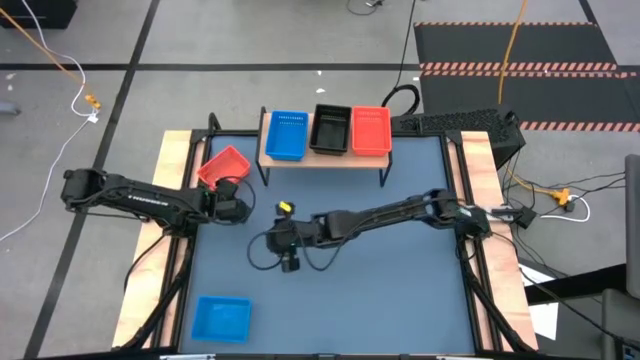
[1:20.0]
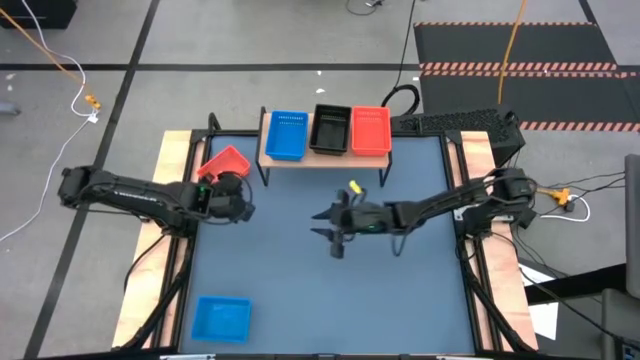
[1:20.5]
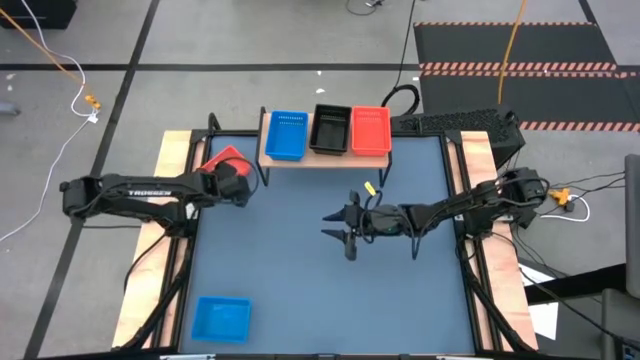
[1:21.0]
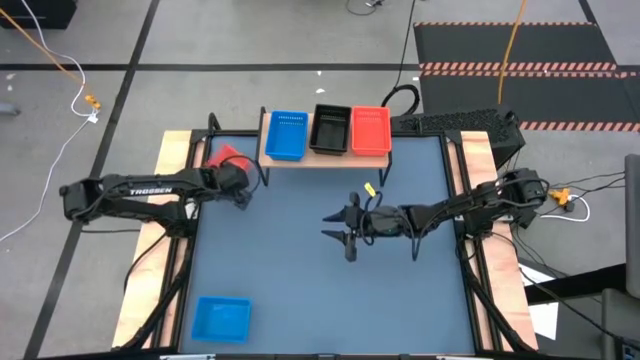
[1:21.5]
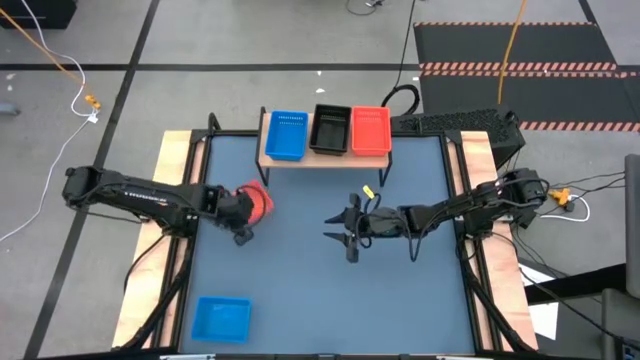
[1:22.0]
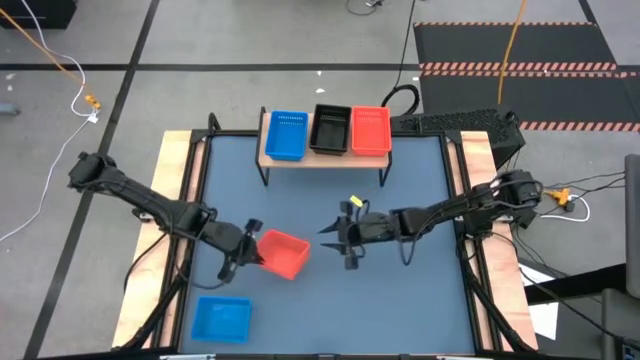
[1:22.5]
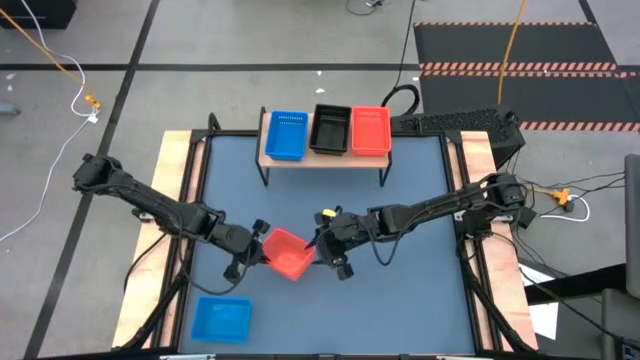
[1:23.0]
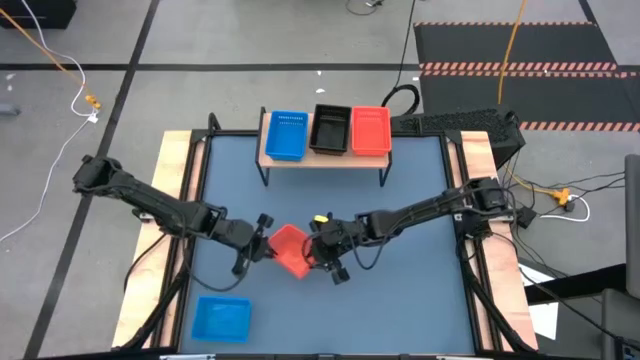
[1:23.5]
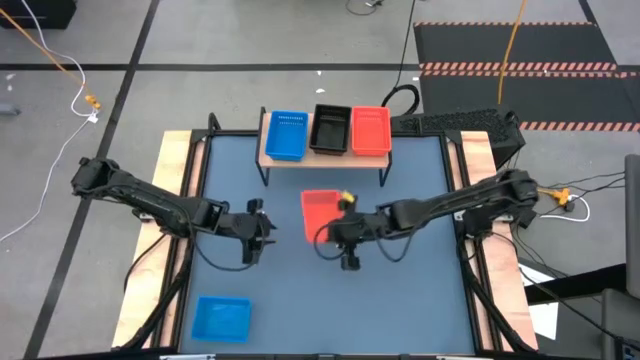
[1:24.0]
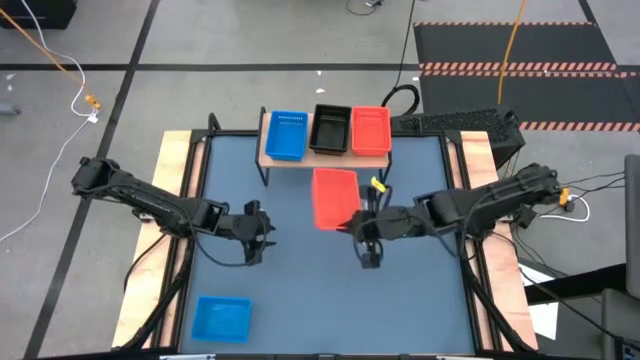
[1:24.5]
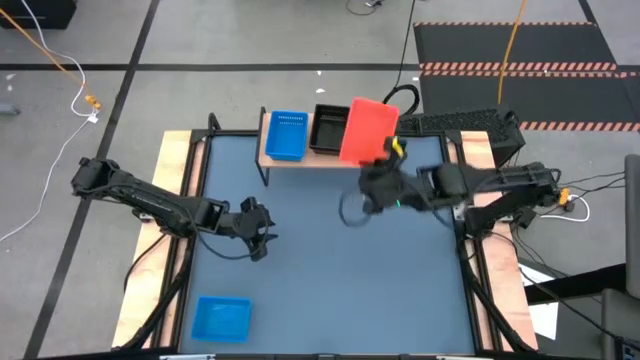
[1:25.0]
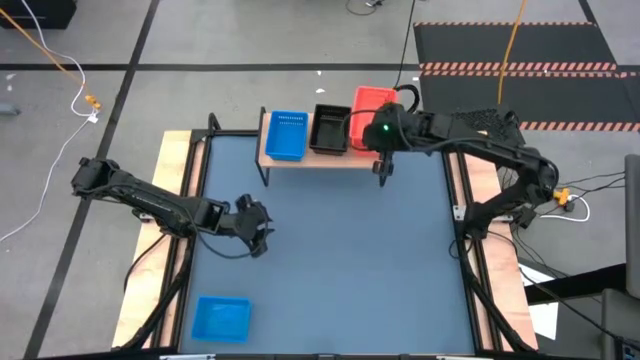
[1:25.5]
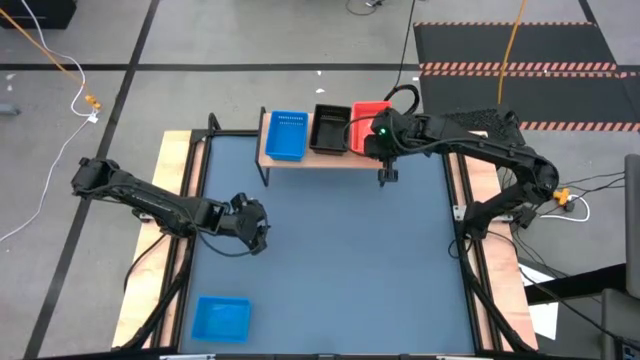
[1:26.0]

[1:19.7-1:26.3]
Task: Stack baskets on shelf by color
Stack the orange bin on the stacked orange bins on the shelf

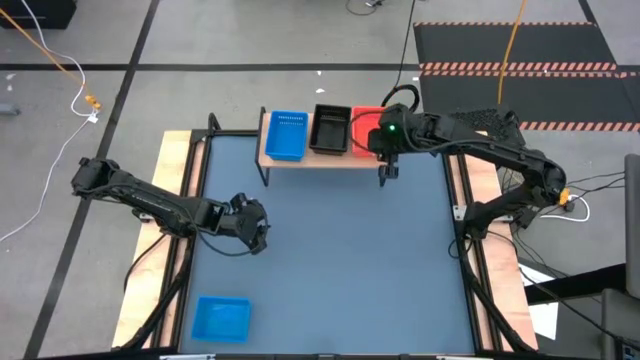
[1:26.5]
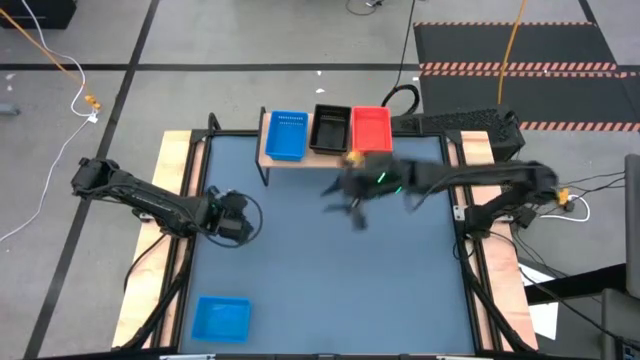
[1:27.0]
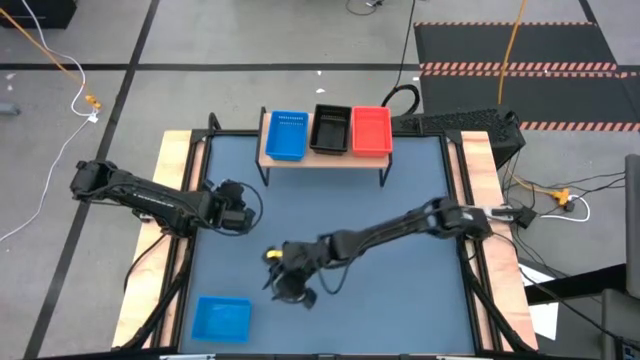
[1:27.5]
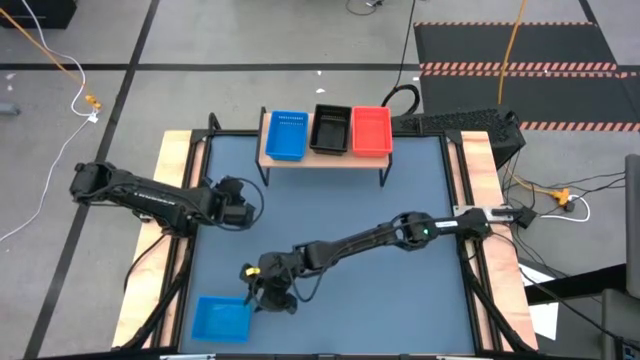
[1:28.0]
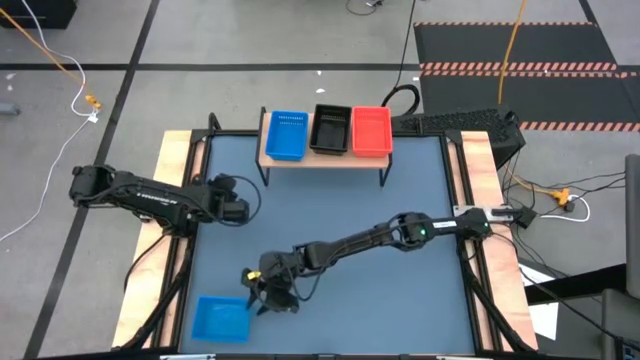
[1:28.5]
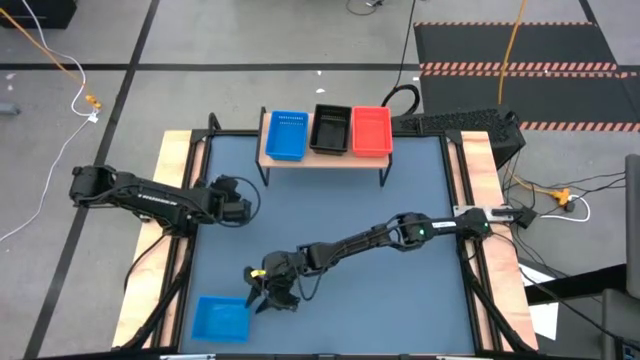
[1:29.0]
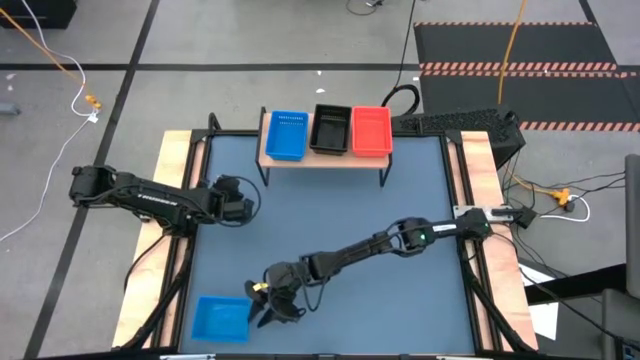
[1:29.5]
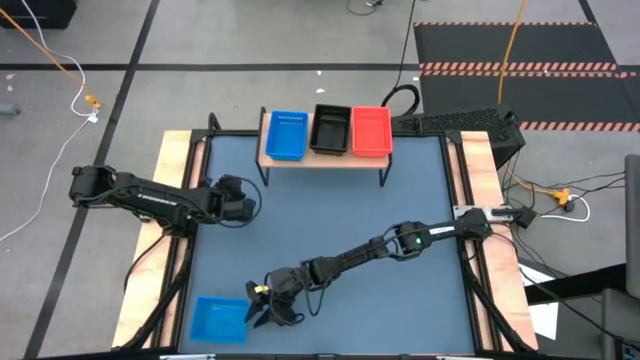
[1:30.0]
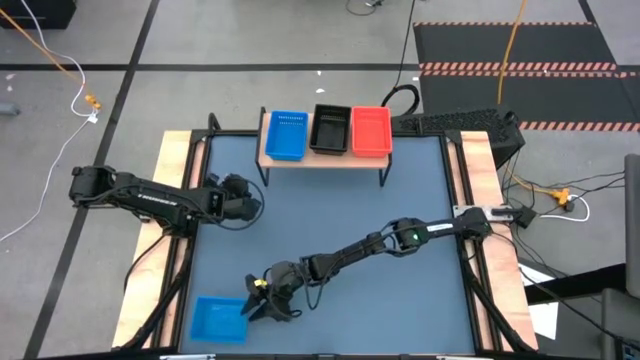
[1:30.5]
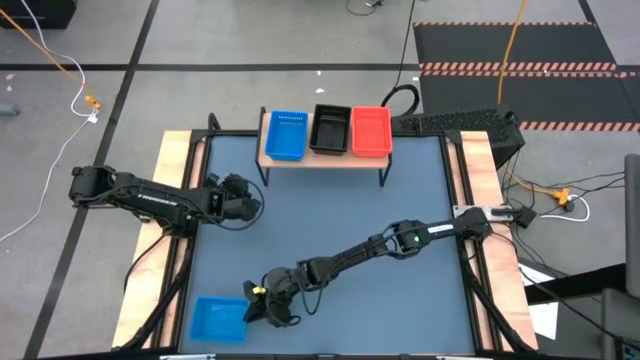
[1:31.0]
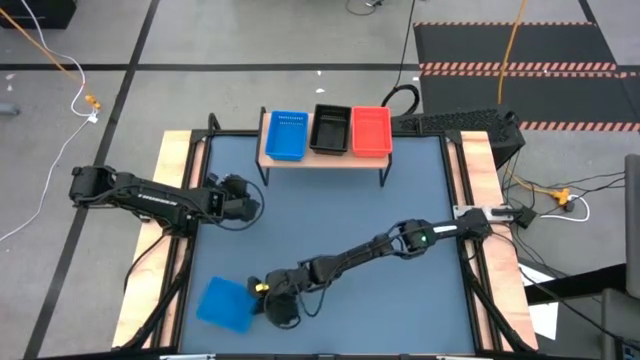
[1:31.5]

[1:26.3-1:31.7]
Stack the blue bin on the stacked blue bins on the shelf

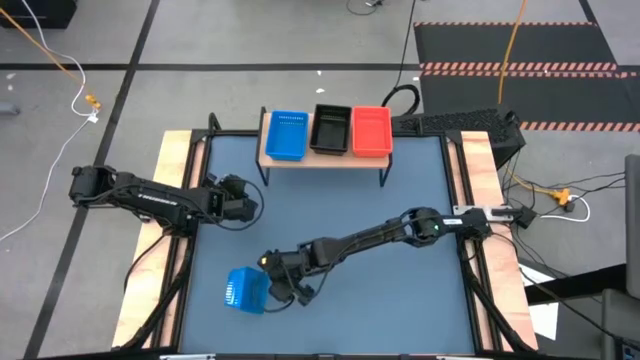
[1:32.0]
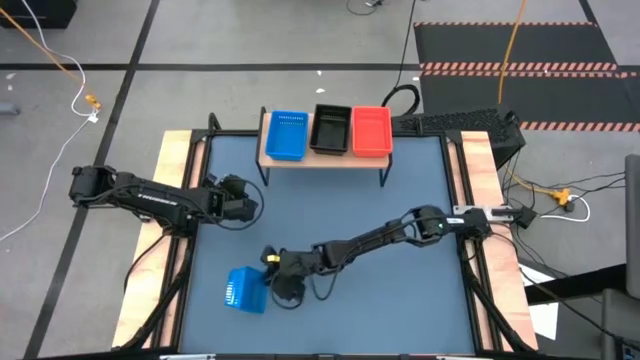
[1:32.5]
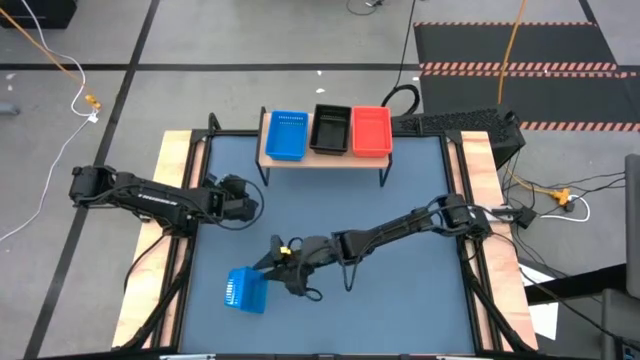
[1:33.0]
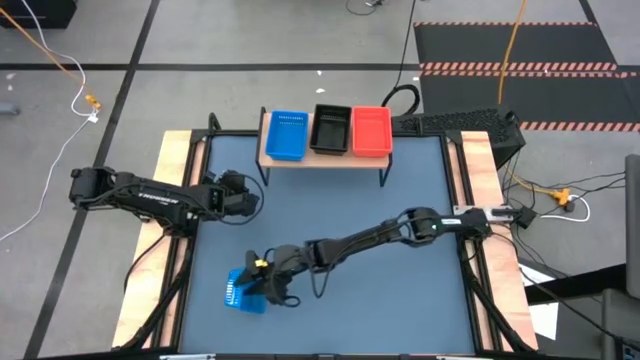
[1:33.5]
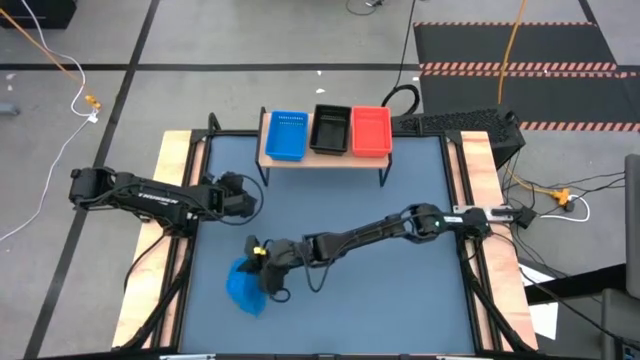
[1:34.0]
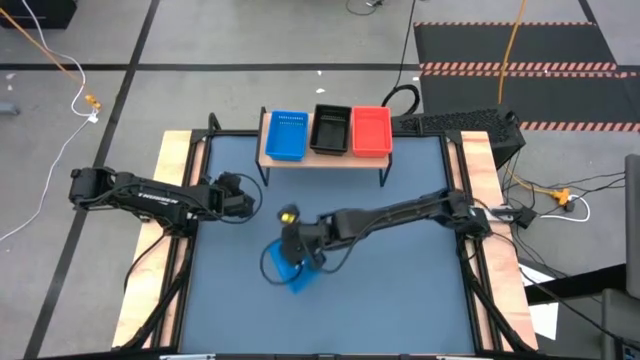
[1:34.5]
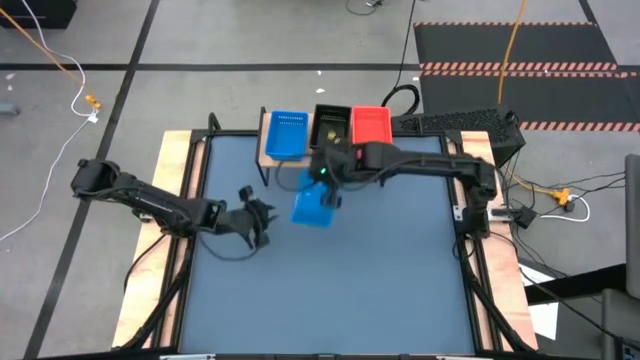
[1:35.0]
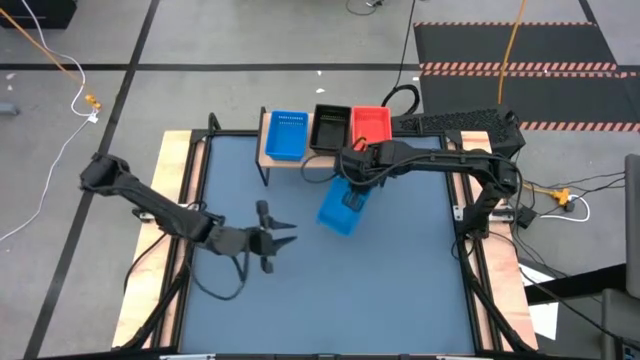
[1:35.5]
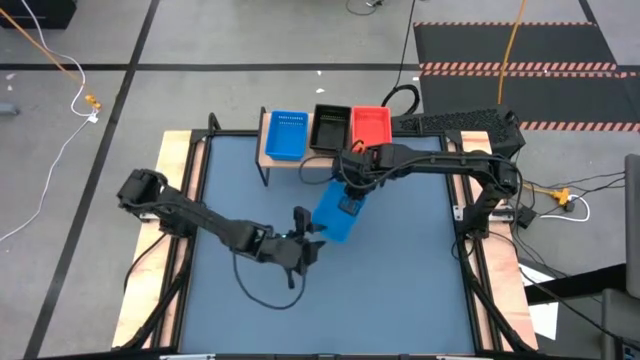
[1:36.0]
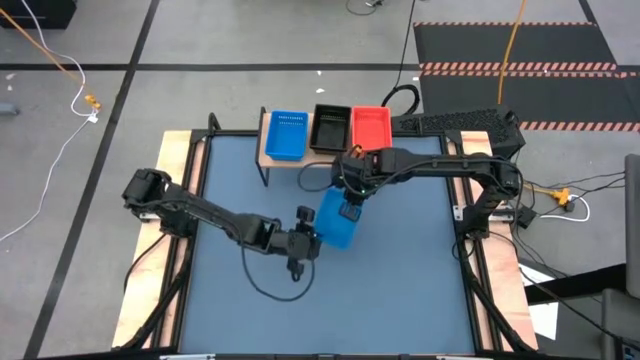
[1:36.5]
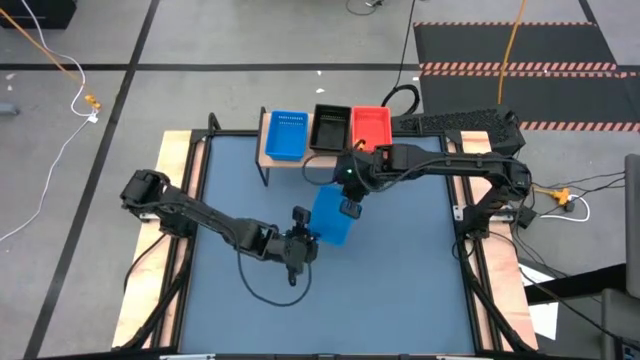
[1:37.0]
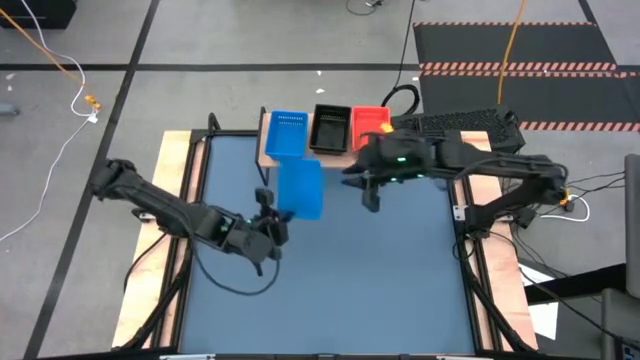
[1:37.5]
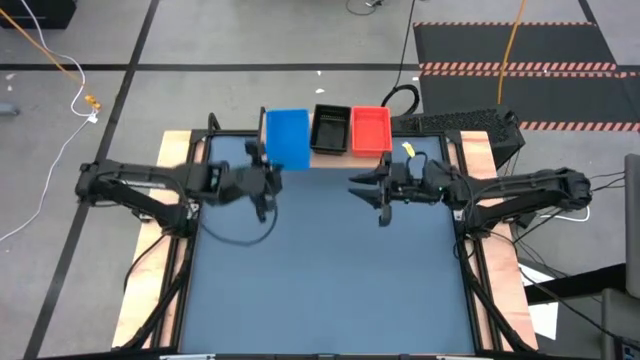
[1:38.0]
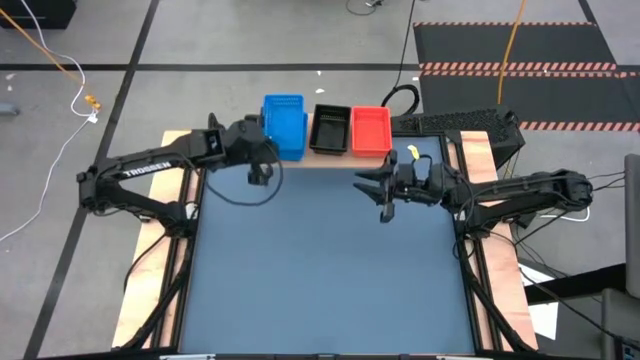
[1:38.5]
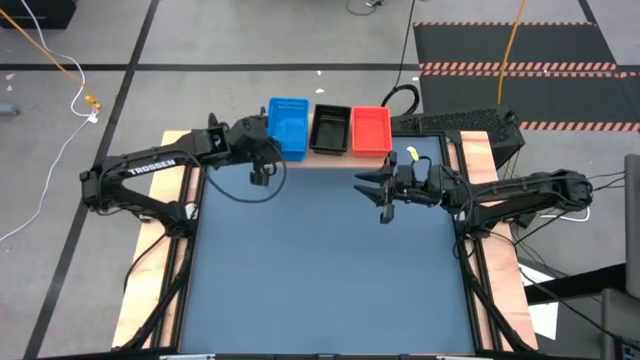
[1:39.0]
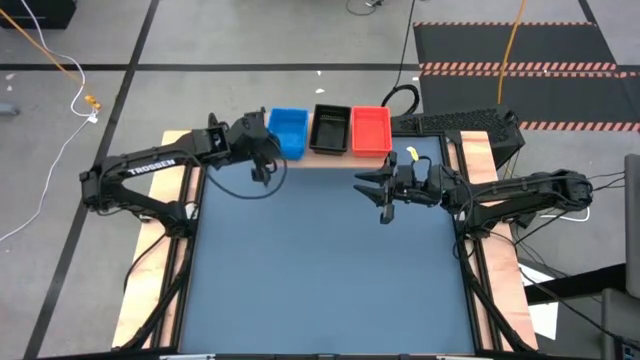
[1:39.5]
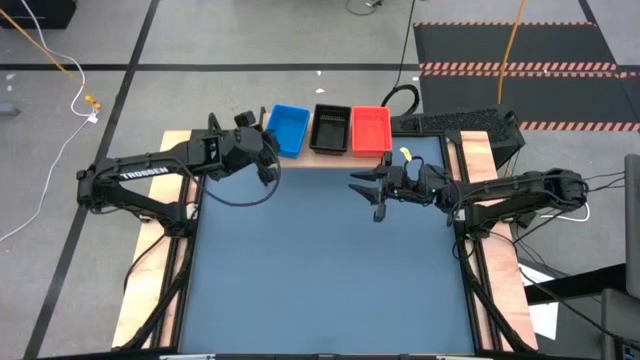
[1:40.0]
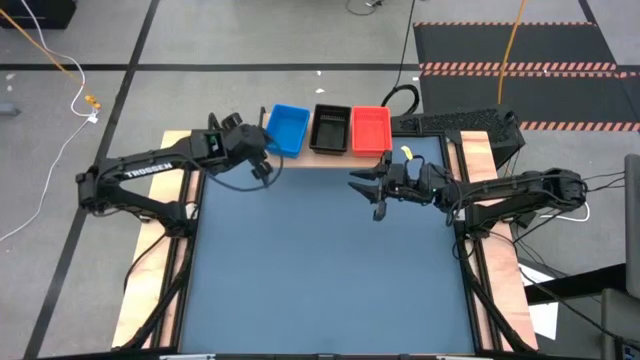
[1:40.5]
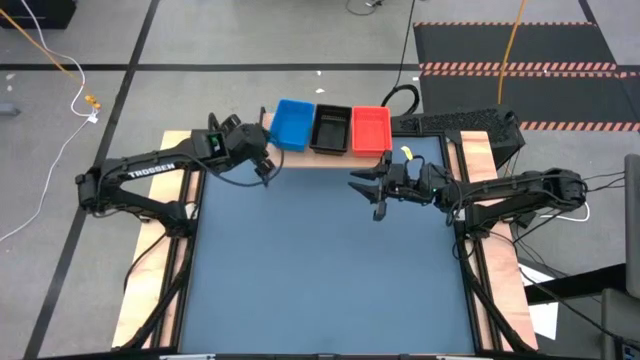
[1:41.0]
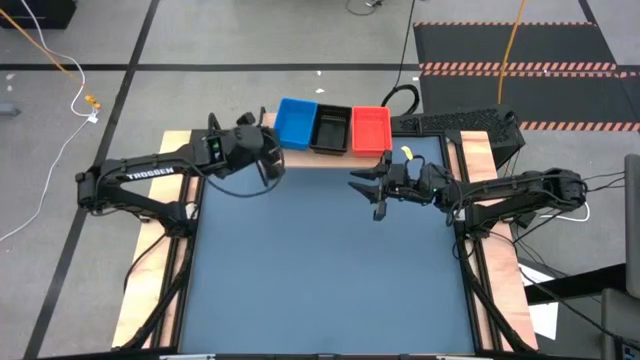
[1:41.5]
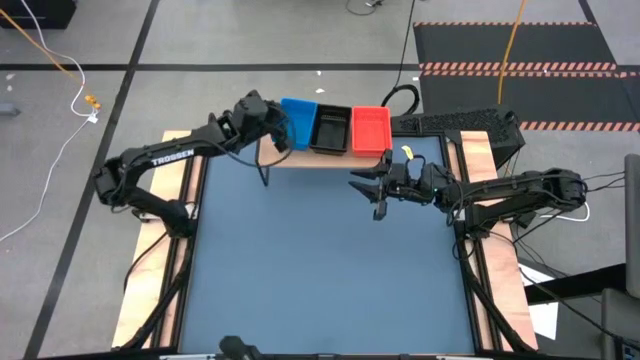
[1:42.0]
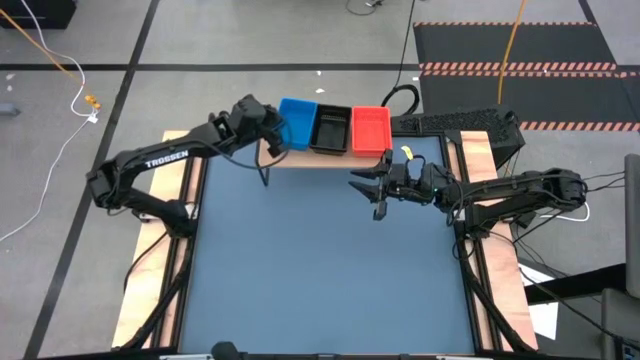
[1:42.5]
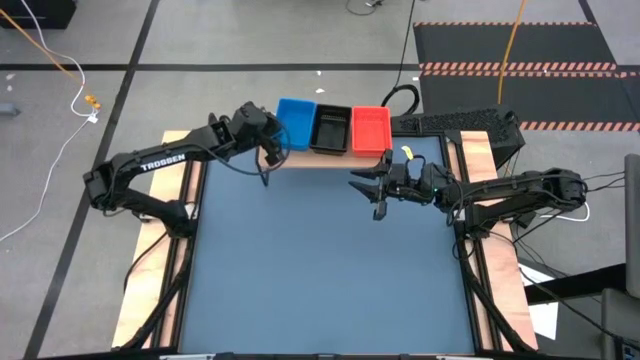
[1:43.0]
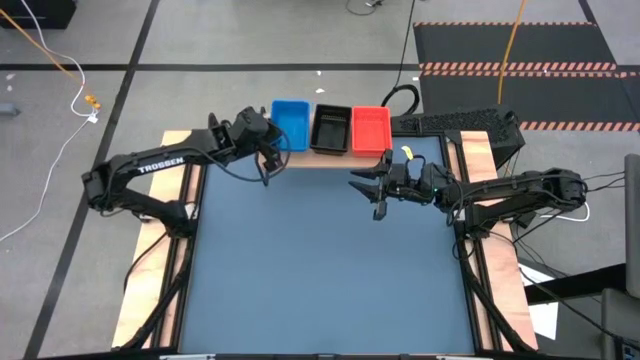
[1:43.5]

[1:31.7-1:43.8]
Stack the blue bin on the stacked blue bins on the shelf
